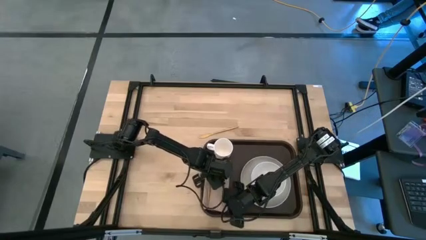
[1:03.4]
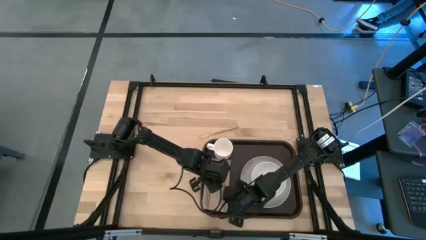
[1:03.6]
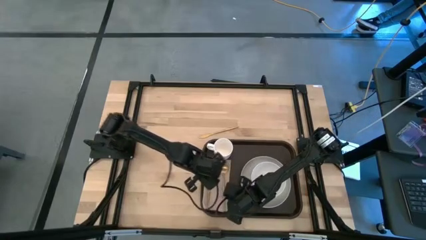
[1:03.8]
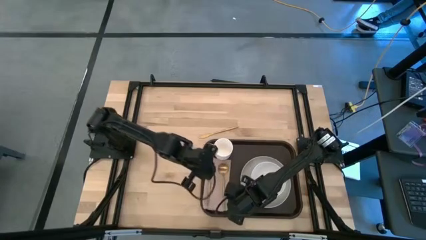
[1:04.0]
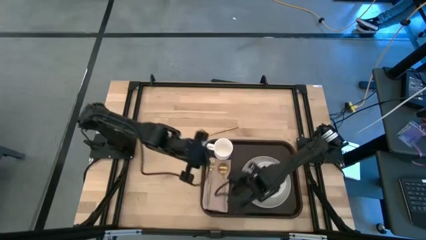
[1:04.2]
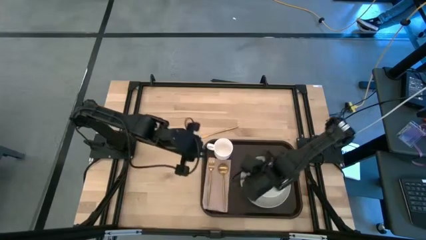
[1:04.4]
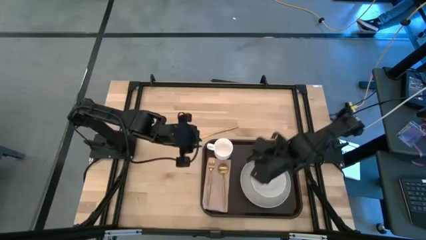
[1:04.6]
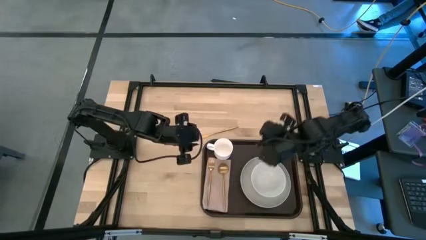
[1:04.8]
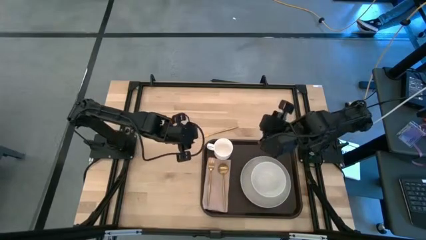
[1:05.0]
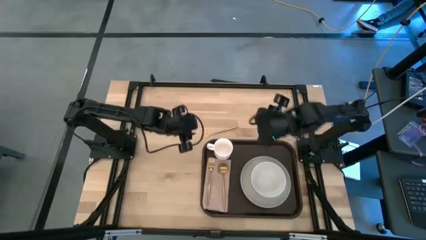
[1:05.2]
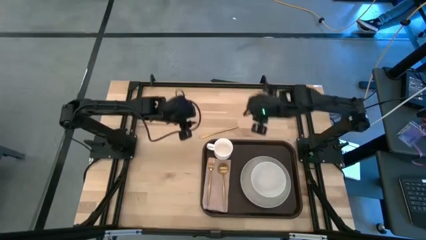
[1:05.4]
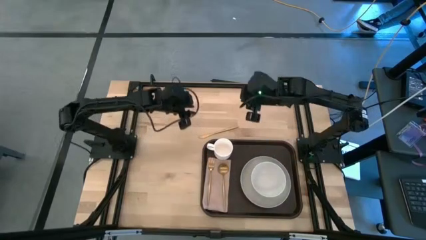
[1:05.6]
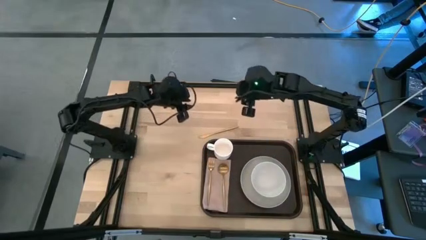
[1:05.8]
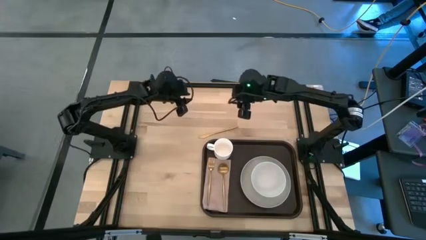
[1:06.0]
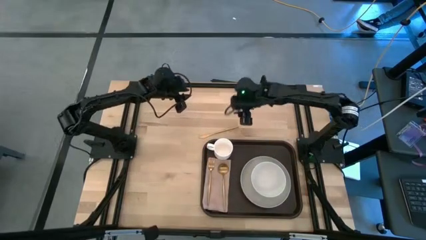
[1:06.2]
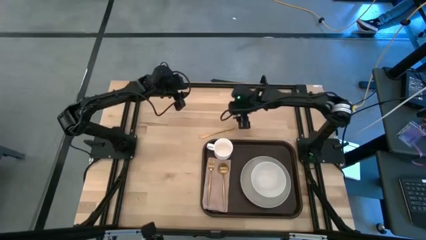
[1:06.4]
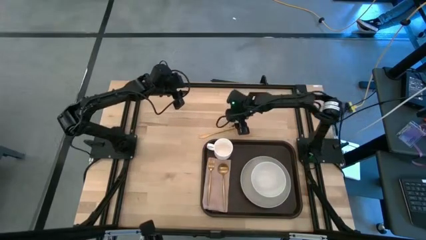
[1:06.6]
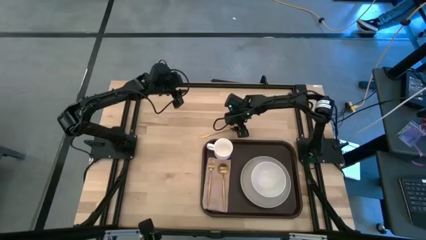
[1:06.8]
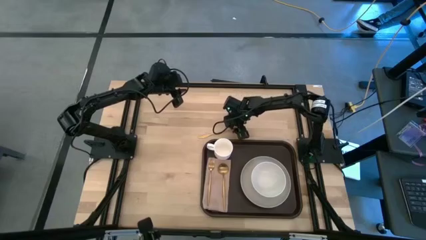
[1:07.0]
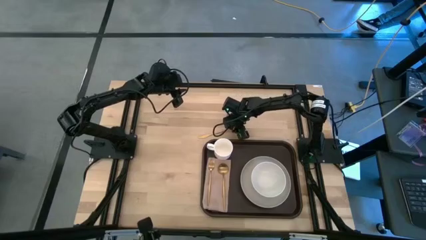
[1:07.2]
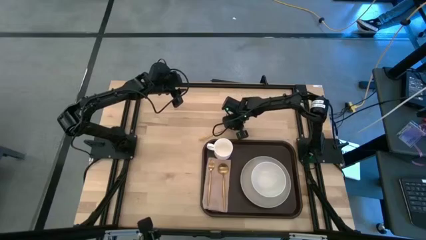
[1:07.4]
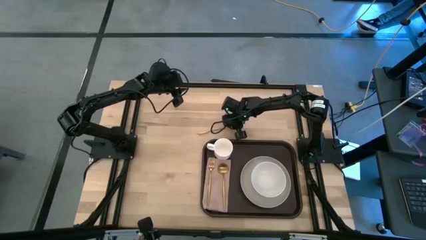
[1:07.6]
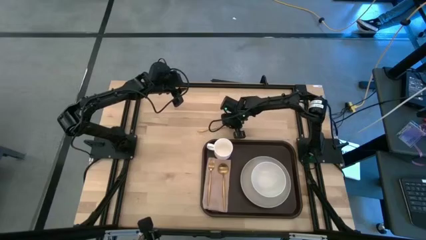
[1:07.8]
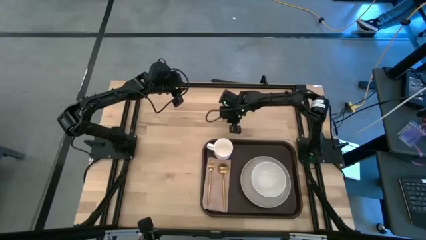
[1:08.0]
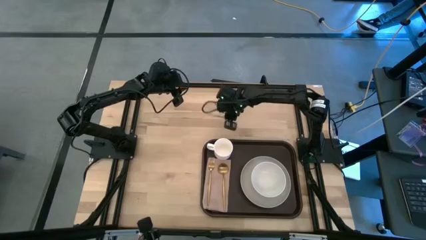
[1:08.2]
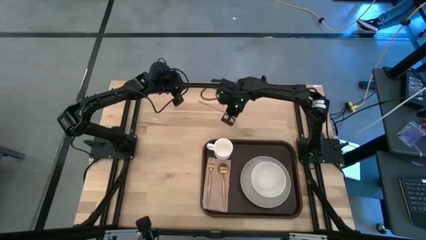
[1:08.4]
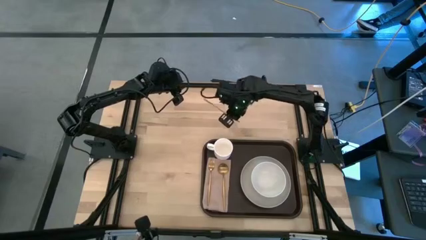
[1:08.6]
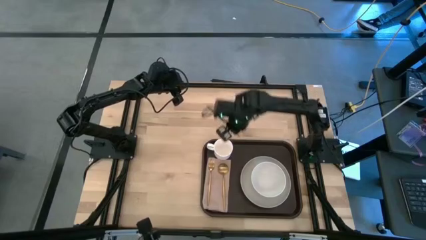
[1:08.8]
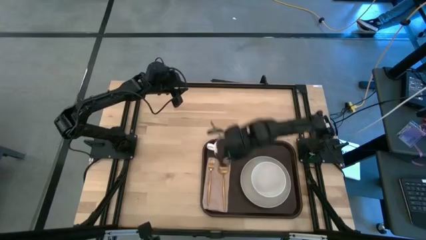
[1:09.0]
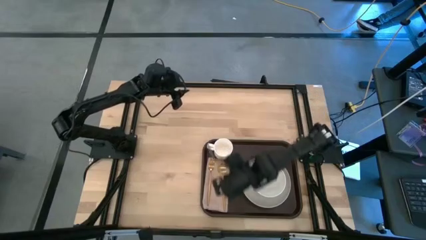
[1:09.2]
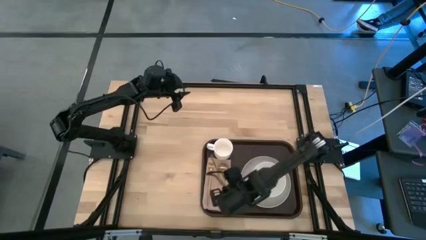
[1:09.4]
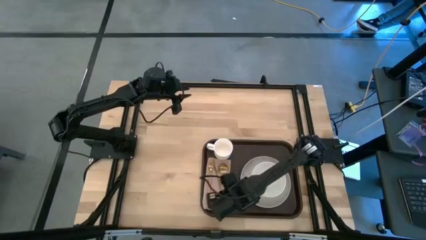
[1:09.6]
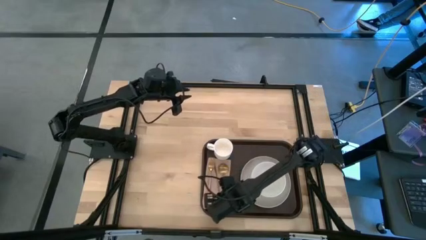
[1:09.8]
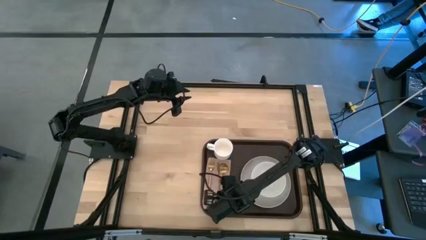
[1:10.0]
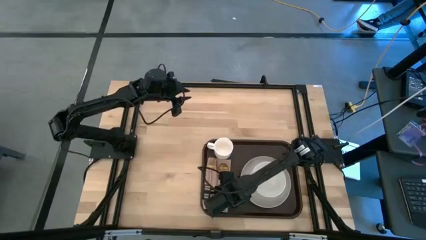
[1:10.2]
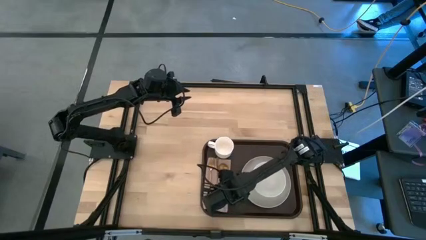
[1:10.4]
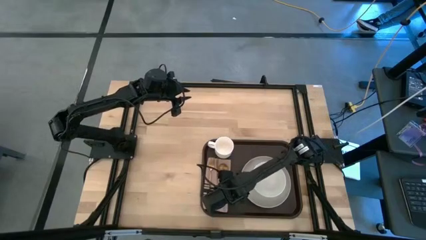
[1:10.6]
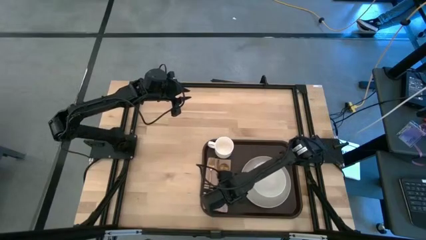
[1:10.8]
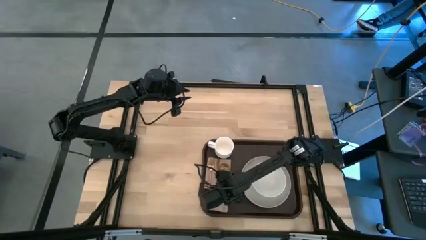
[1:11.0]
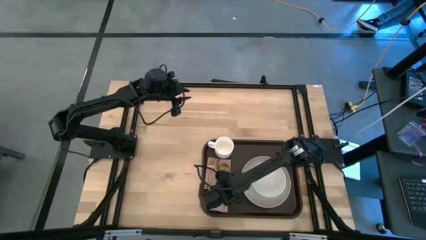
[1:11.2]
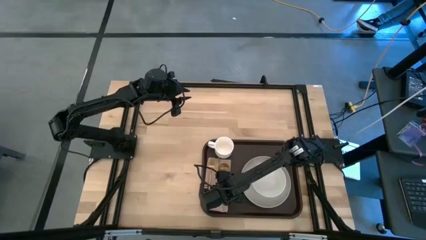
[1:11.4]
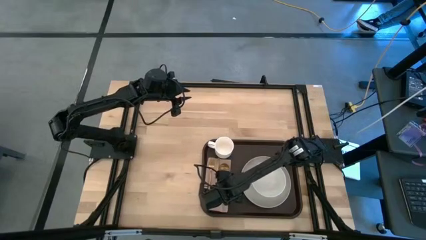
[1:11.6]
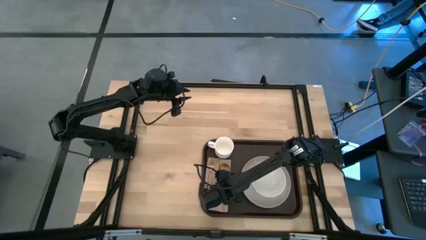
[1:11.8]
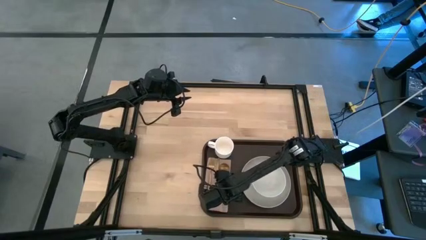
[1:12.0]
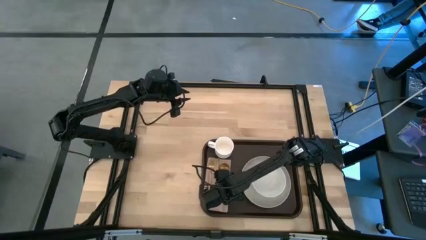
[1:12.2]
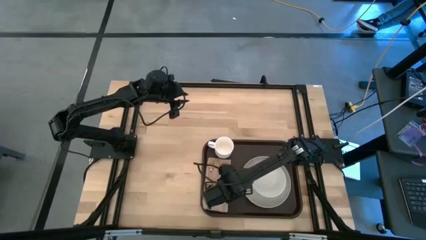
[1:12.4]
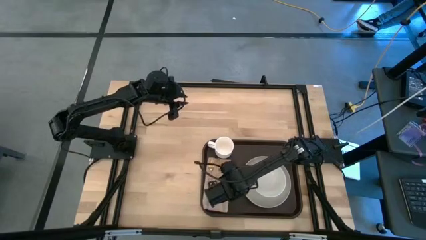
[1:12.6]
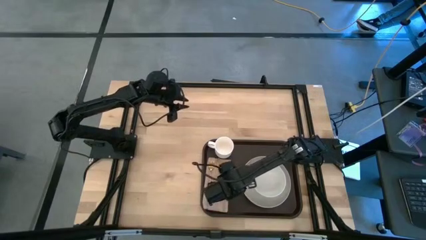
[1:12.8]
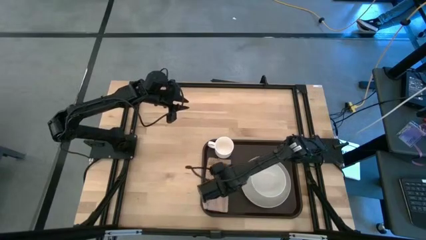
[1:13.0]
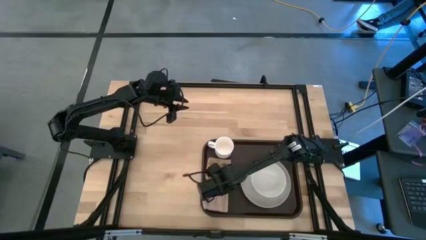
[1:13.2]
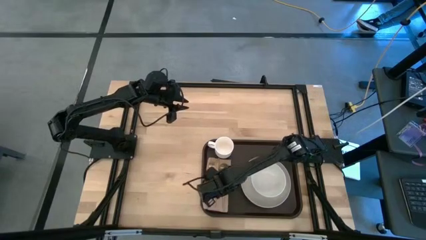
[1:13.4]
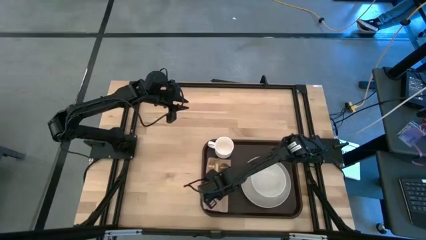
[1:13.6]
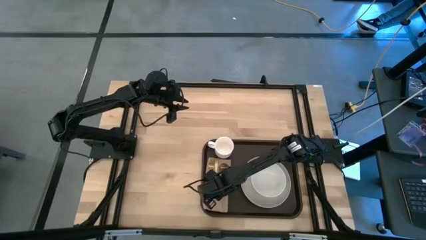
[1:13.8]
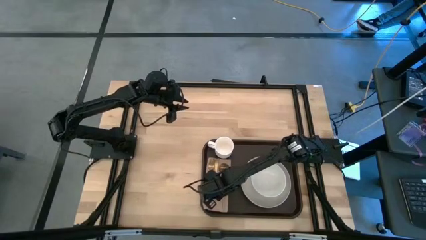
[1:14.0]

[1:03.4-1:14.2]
Task: Set up tray
Put the gold knife on the brown napkin between the gold fork and gold spoon

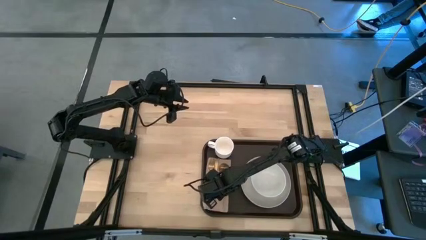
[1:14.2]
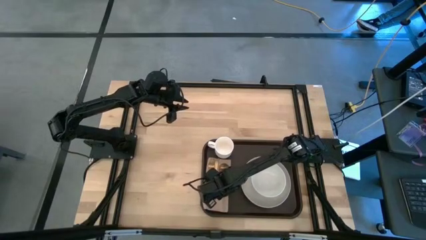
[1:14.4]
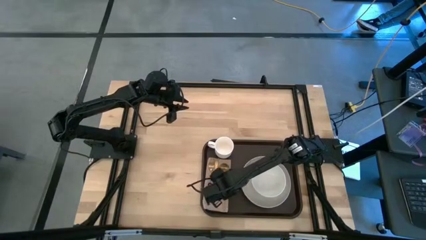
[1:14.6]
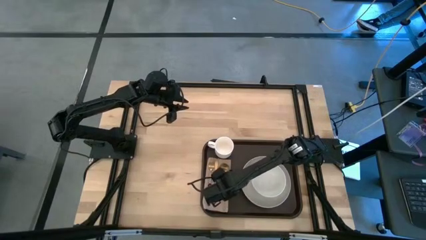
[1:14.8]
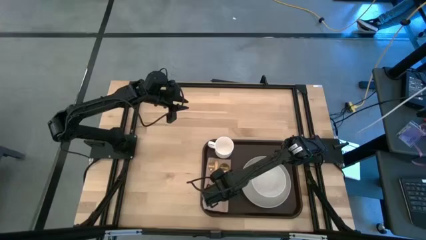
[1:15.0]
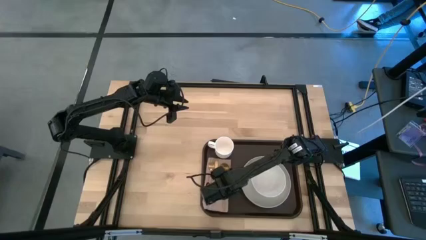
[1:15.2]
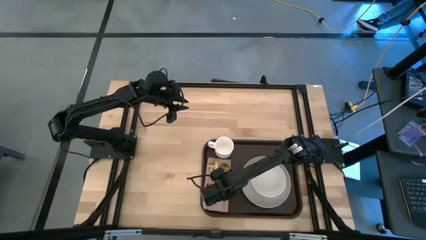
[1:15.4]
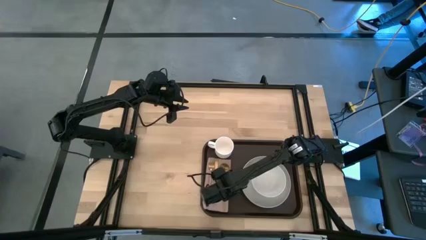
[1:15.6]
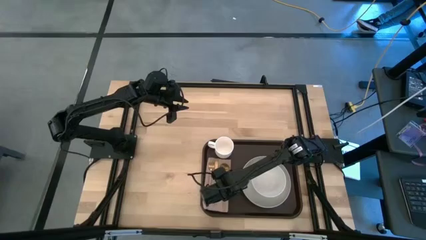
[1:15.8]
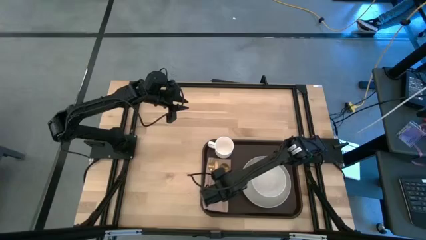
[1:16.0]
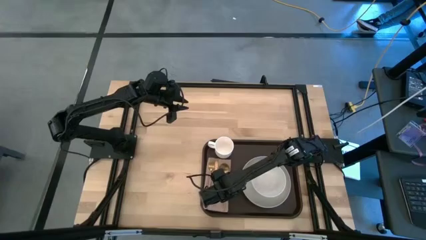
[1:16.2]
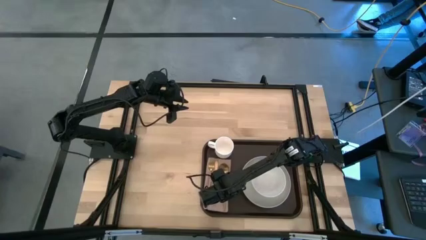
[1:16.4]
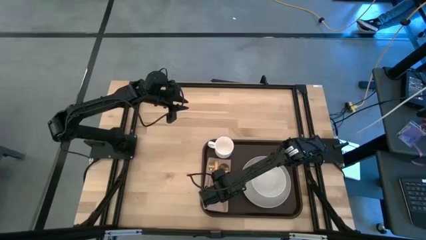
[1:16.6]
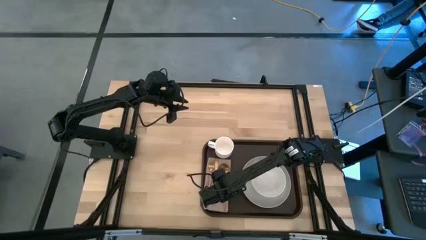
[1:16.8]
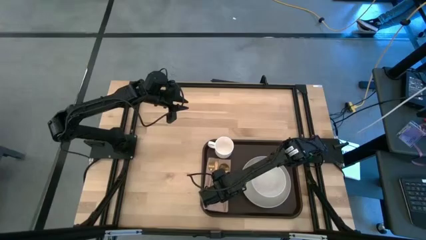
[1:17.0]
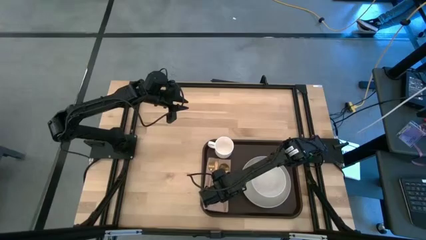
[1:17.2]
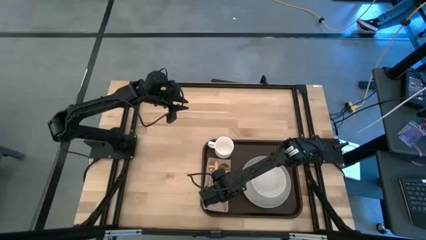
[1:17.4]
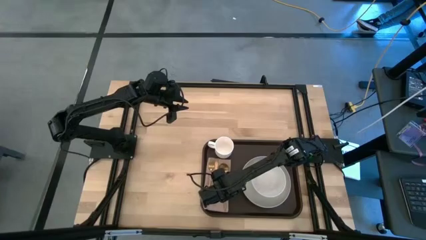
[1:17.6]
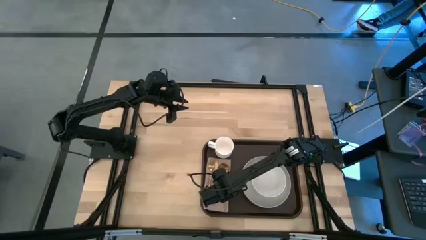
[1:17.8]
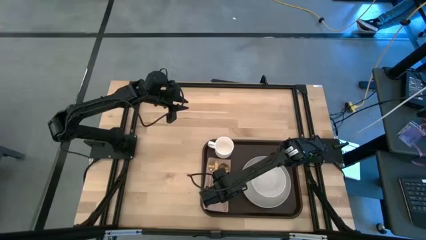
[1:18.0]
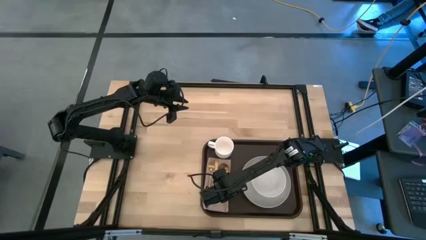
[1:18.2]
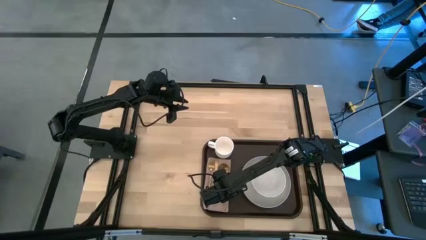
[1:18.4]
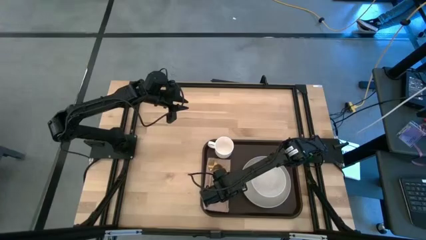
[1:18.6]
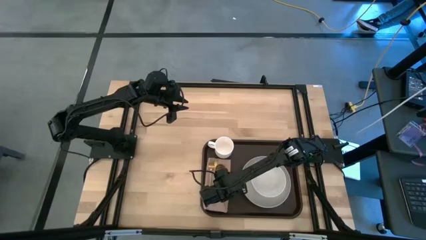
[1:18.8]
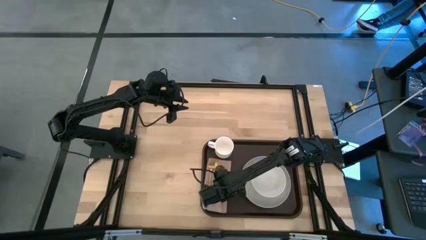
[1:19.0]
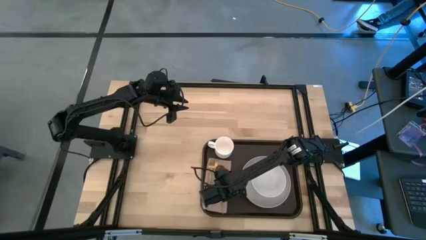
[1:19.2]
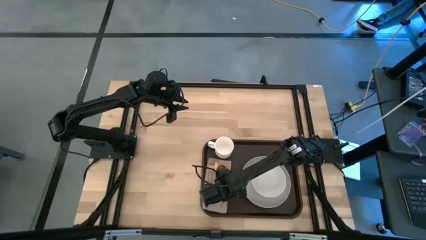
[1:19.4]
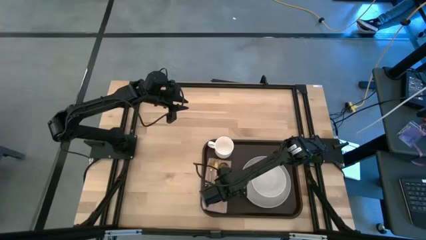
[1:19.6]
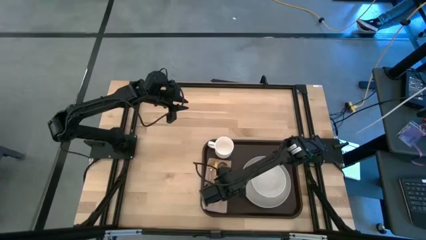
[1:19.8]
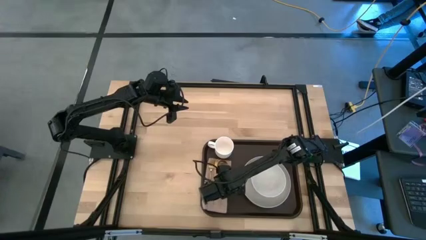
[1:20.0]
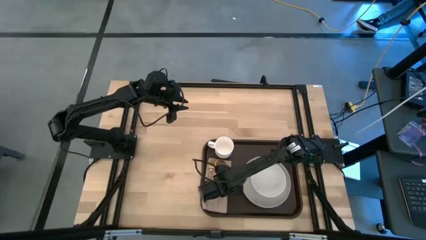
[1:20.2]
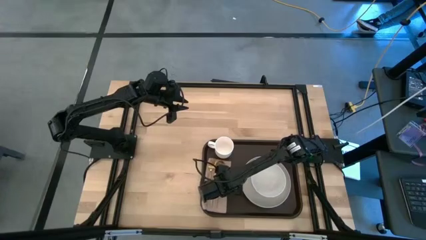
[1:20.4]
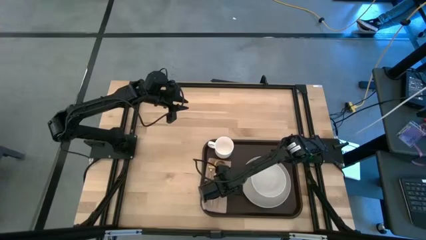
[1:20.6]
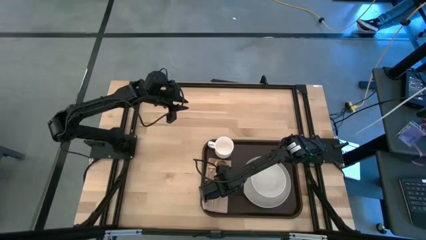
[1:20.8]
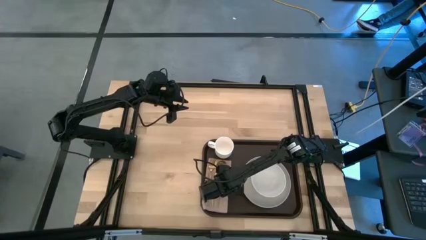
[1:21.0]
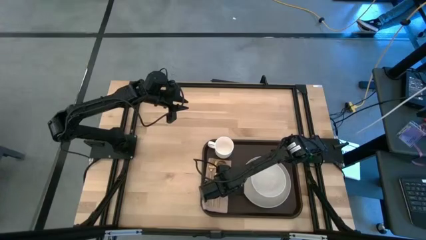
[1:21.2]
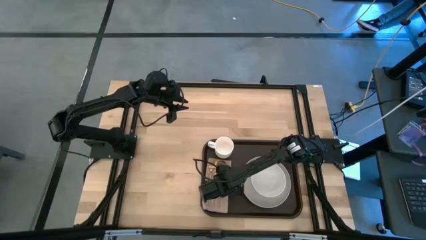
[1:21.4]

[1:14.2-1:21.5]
Adjust the gold spoon on the brown napkin
